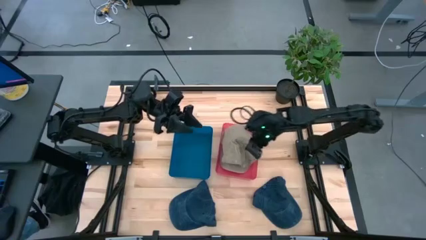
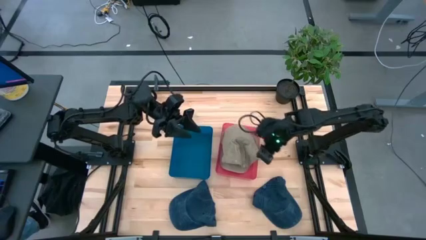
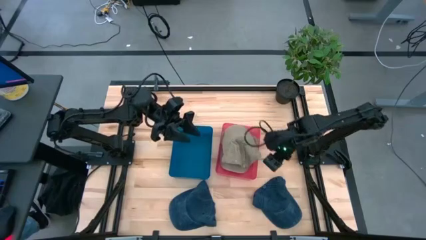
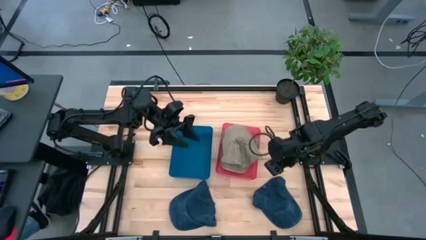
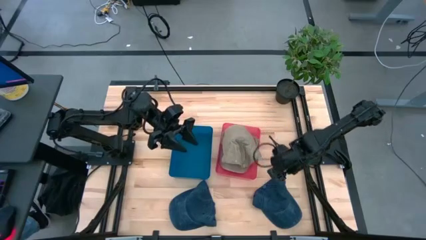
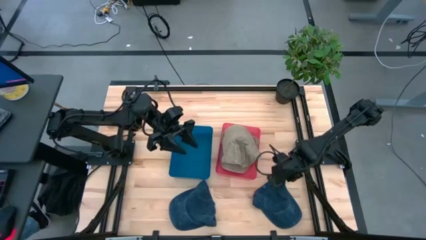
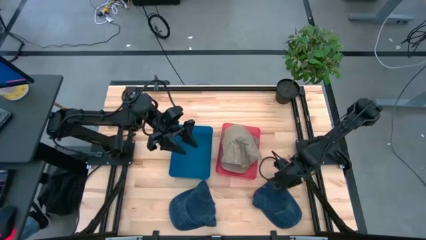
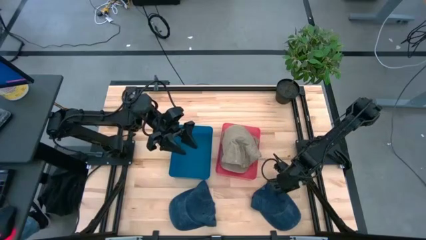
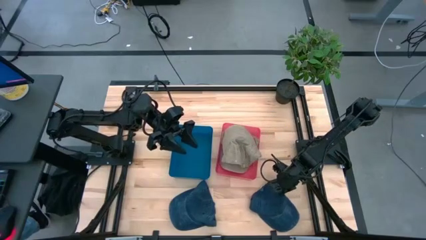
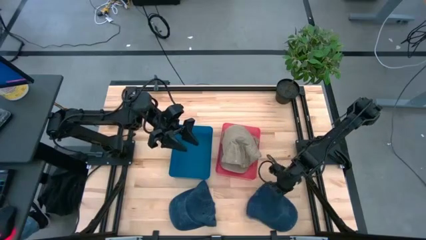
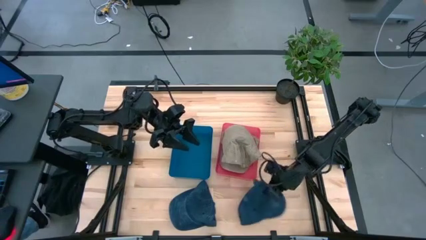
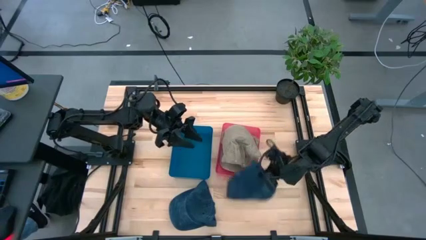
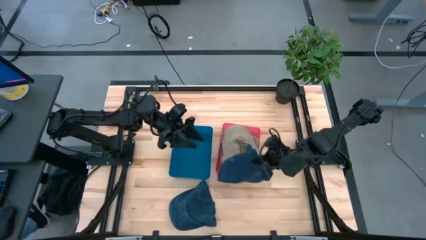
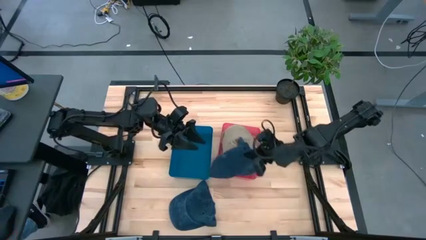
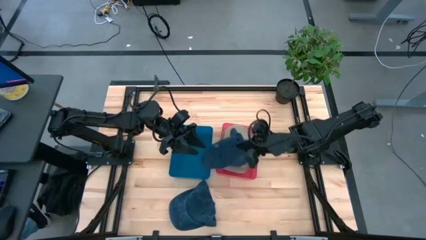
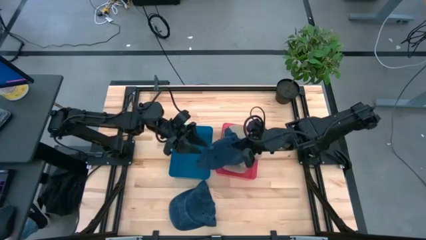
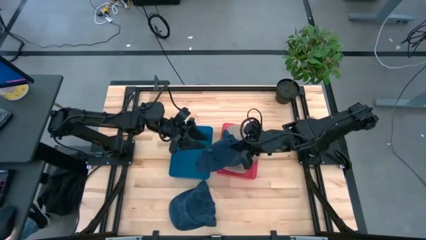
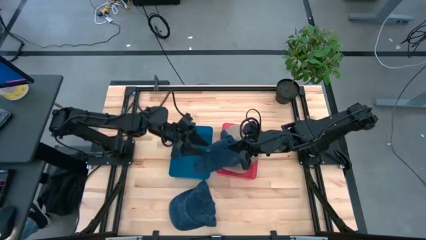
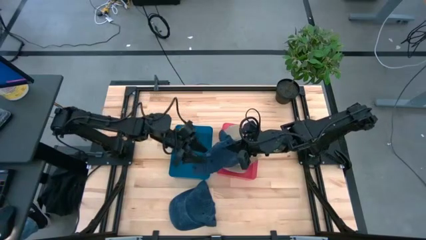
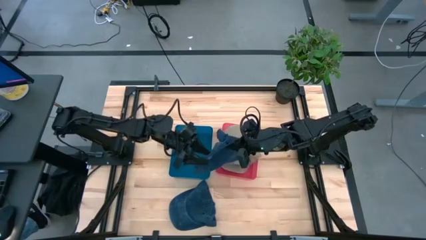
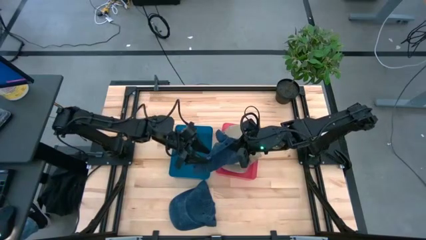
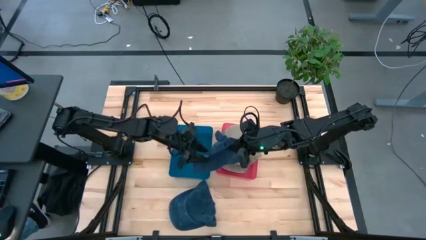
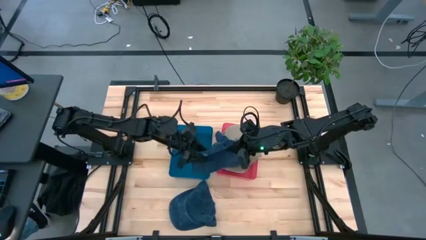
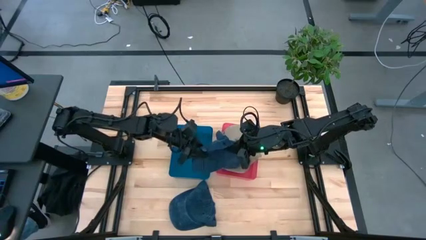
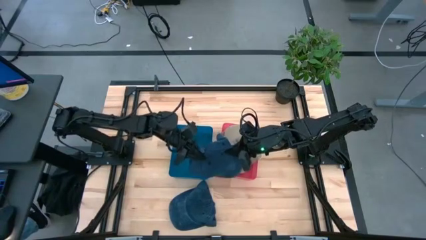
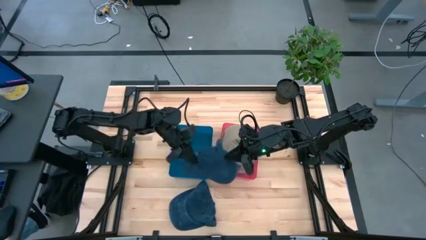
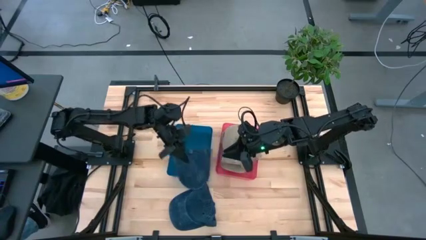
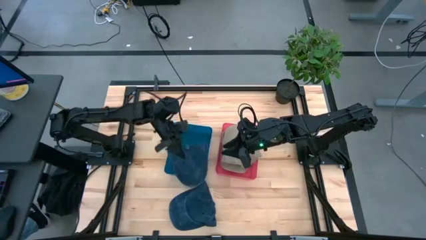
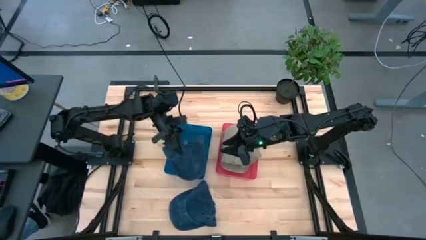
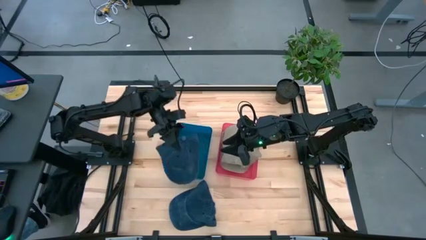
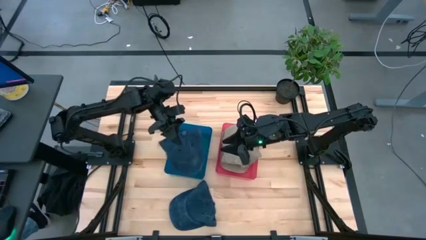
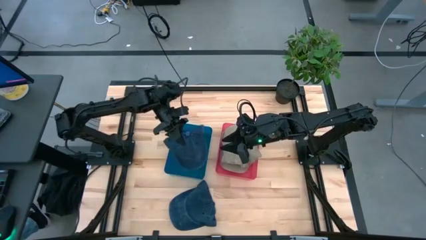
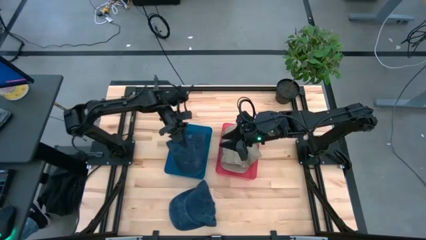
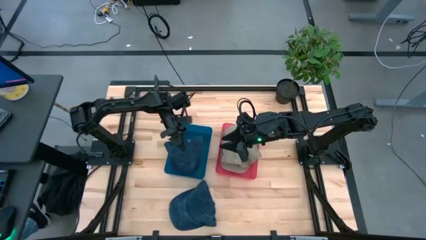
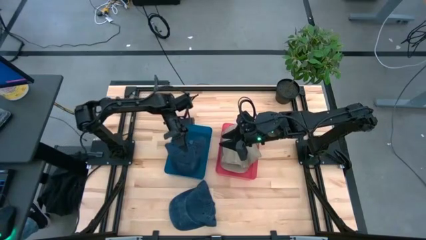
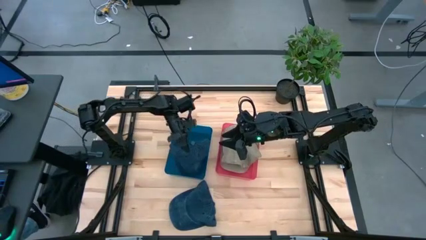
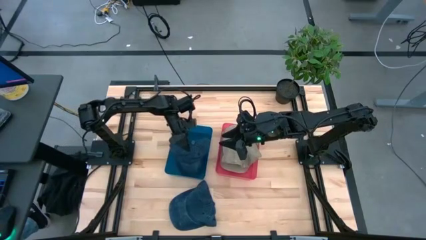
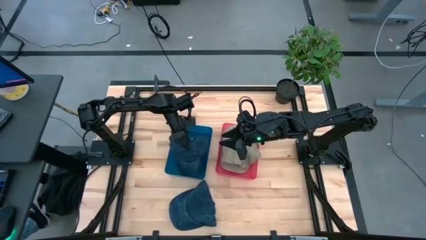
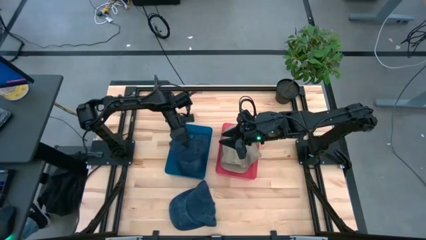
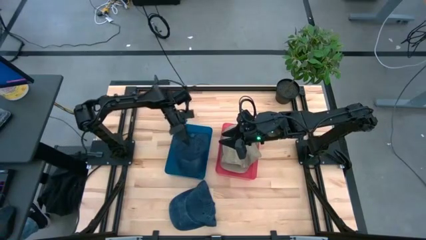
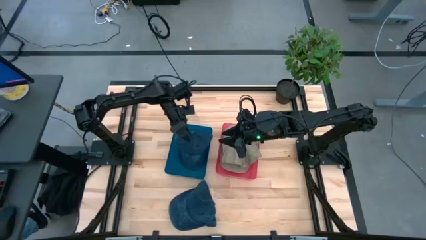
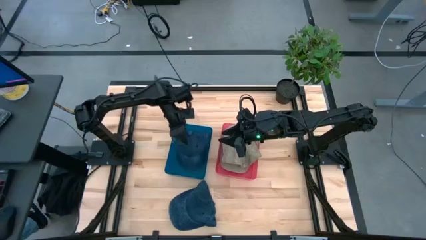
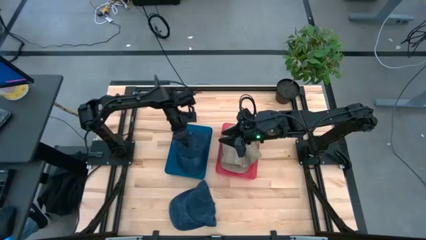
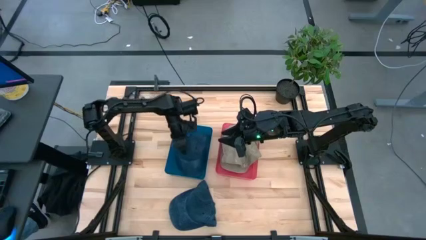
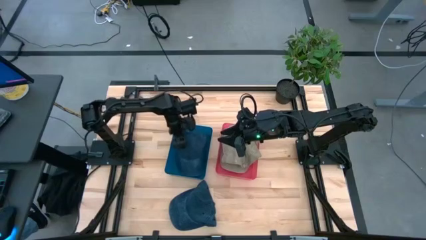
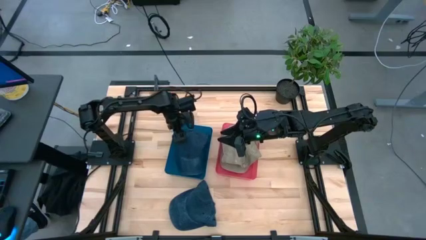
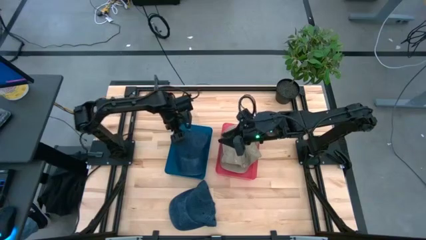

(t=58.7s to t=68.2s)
Task: Pick & Place hat
Put the blue cap into the blue bin

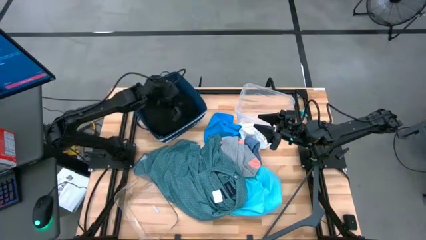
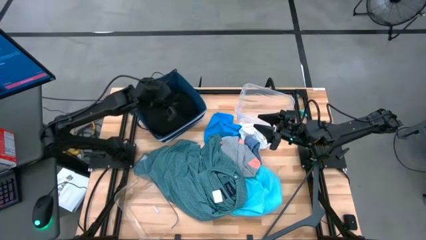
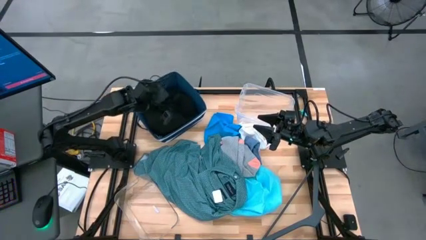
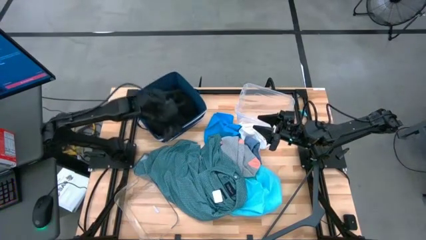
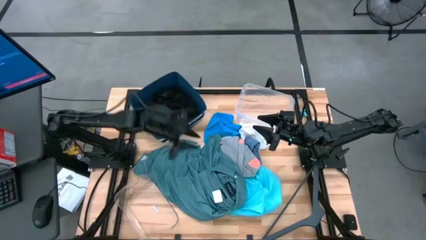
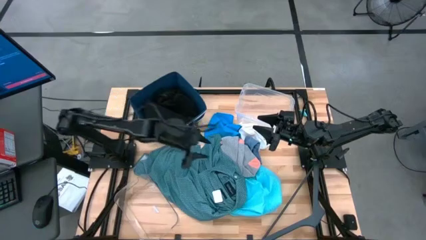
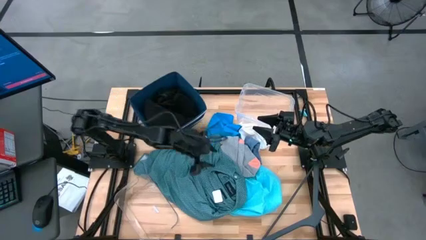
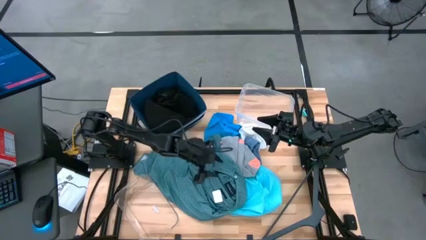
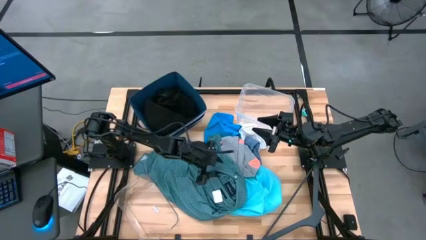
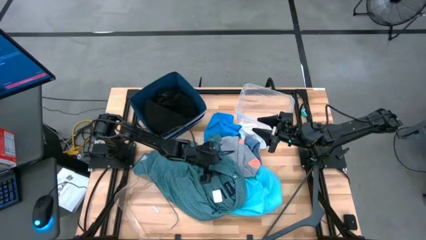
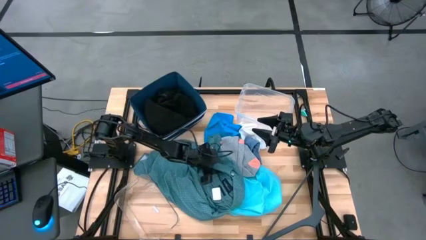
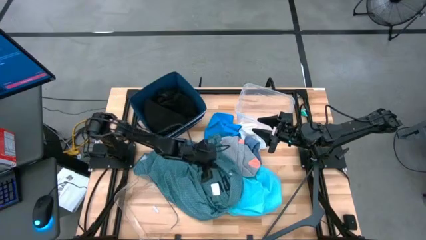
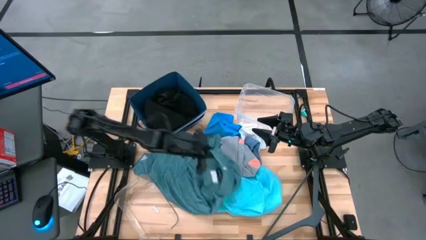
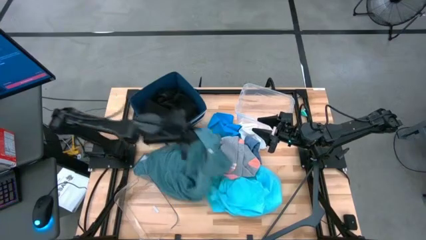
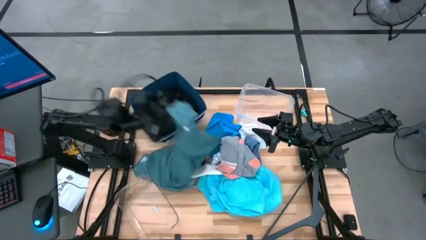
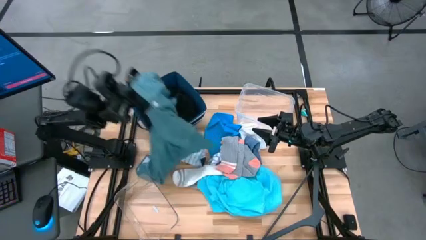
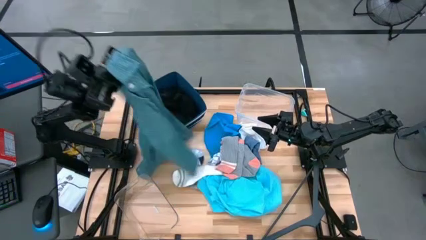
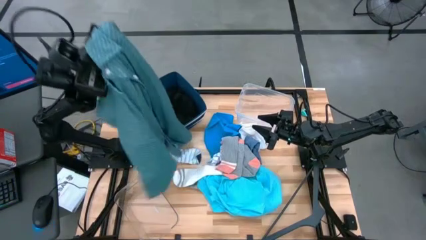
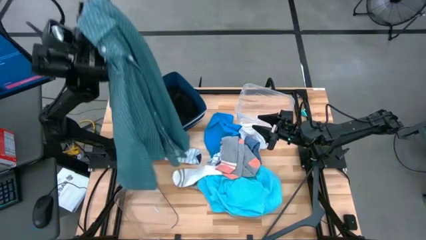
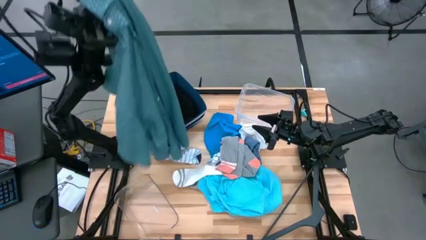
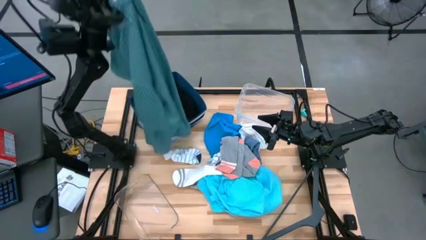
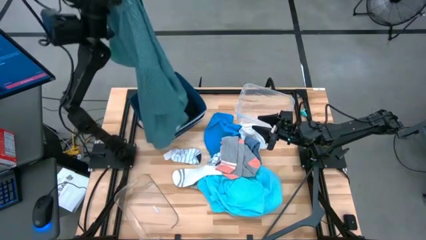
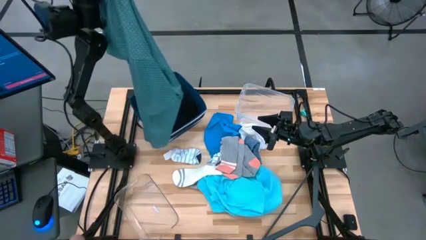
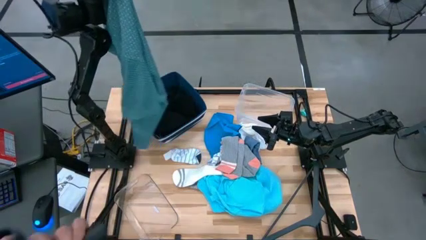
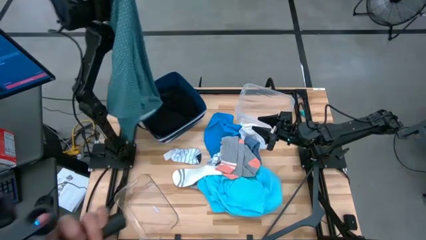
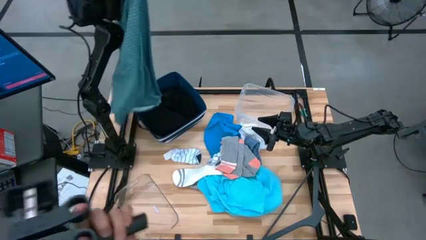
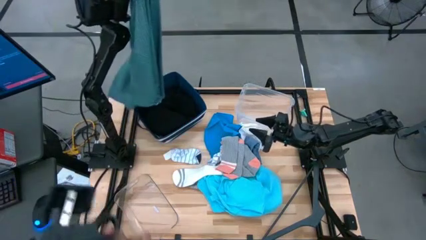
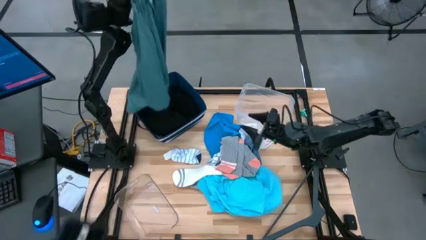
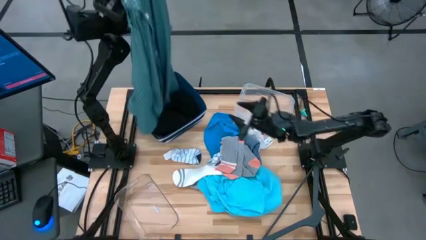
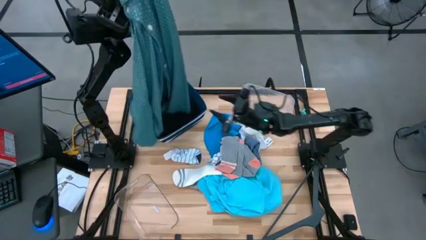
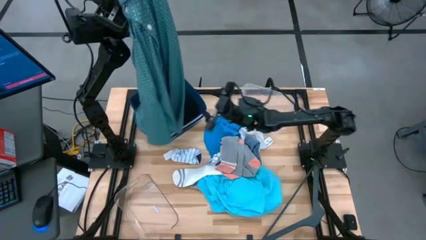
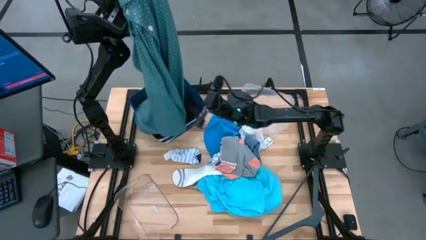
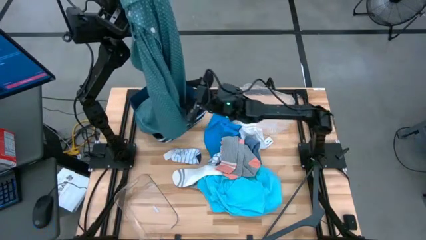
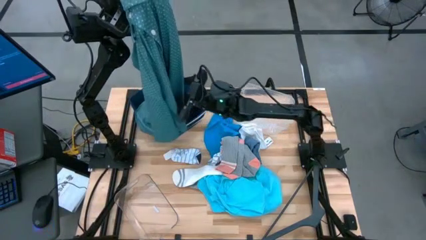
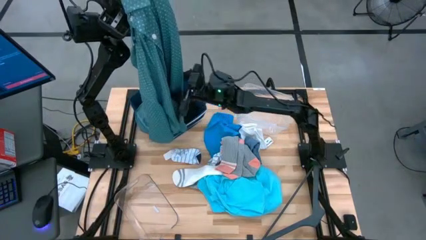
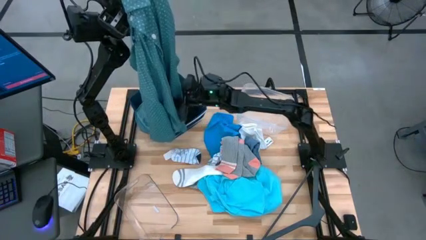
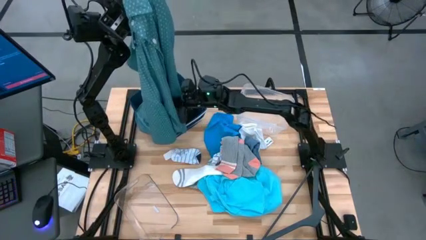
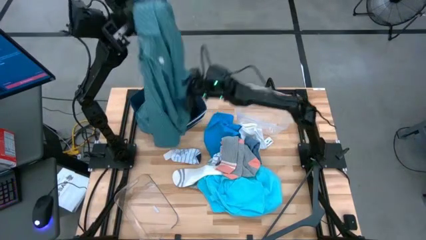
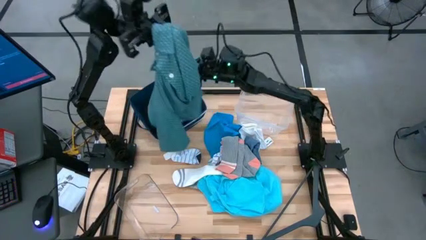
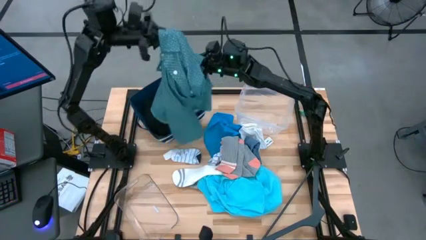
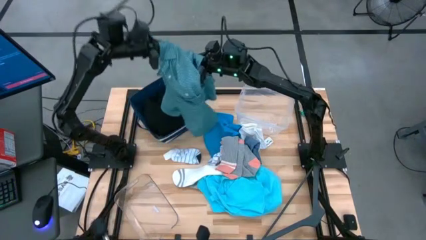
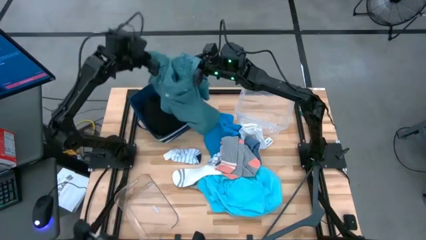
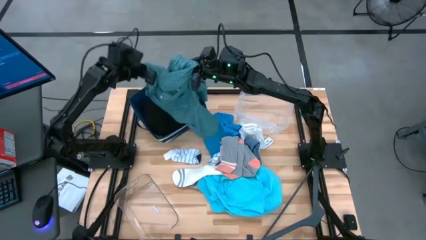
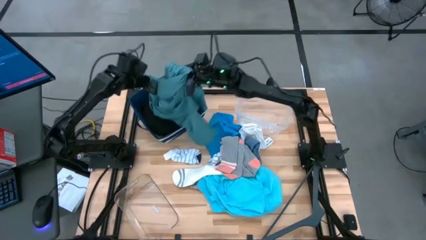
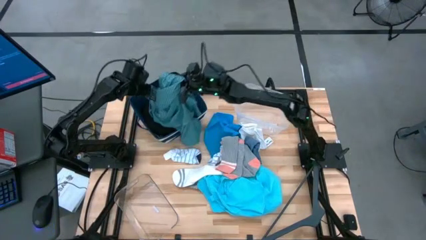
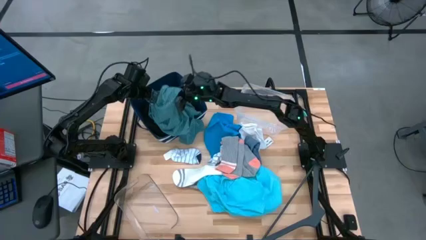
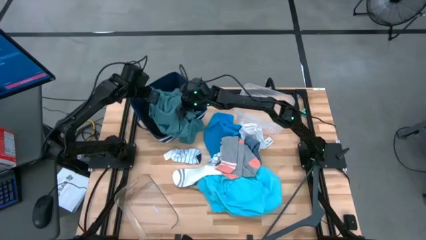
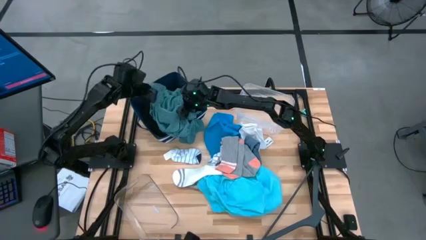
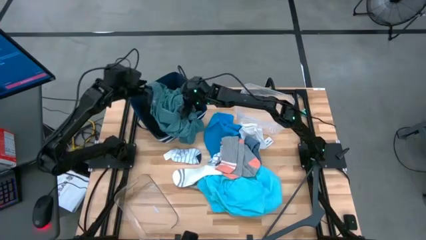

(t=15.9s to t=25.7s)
Task: Pick & Place Cloths
Put the blue shirt into the blue bin
